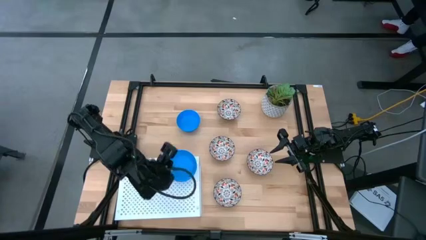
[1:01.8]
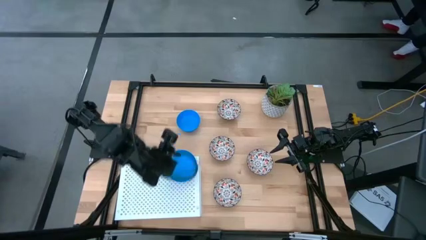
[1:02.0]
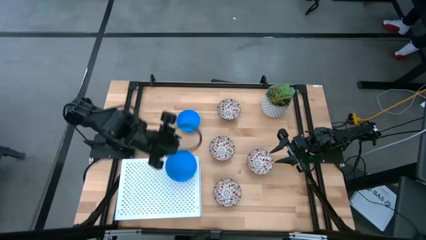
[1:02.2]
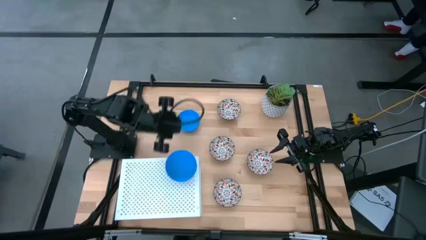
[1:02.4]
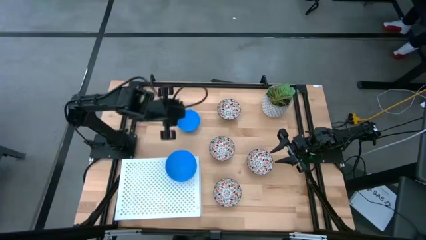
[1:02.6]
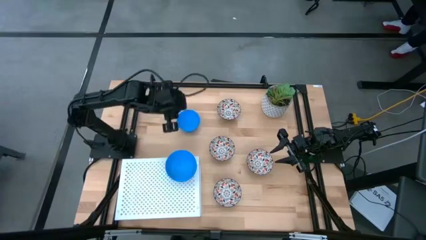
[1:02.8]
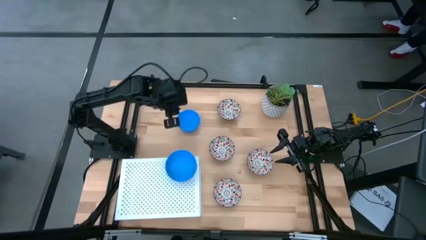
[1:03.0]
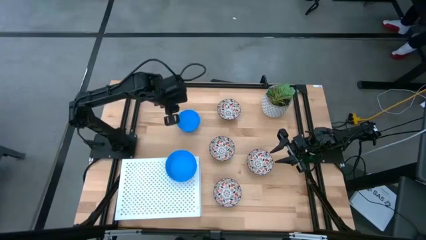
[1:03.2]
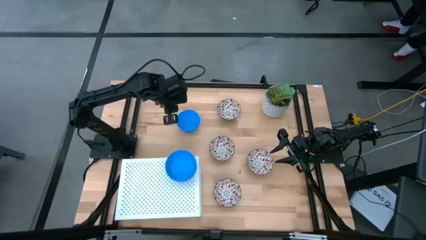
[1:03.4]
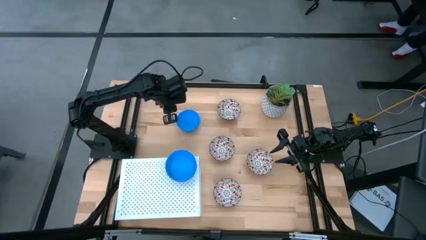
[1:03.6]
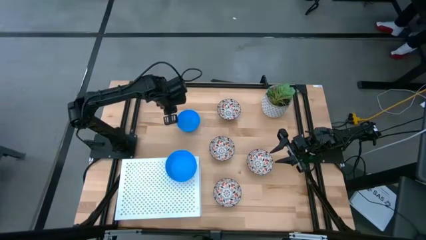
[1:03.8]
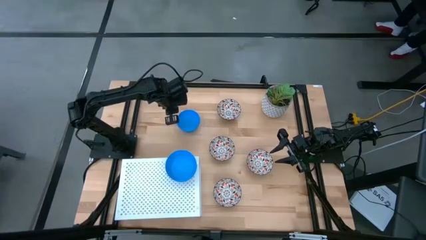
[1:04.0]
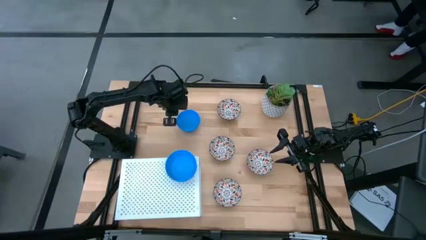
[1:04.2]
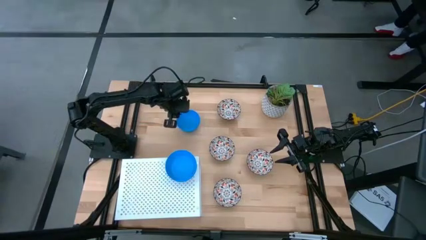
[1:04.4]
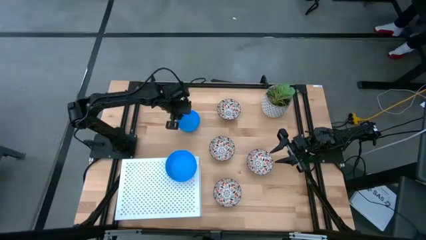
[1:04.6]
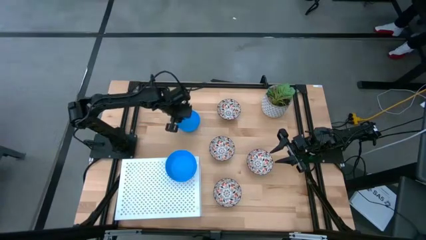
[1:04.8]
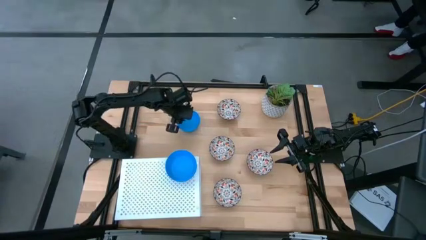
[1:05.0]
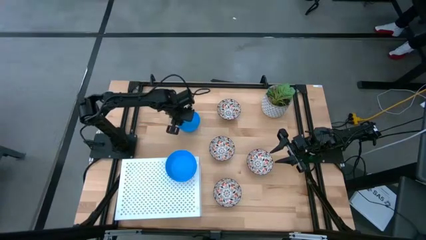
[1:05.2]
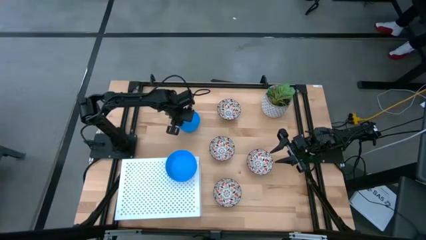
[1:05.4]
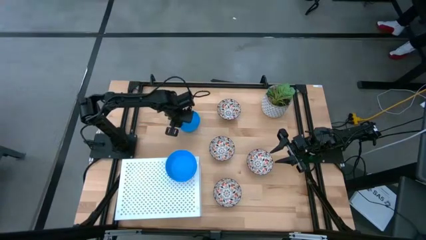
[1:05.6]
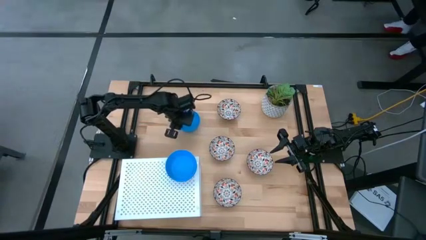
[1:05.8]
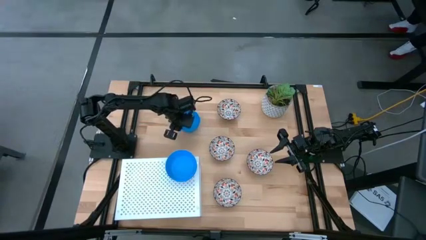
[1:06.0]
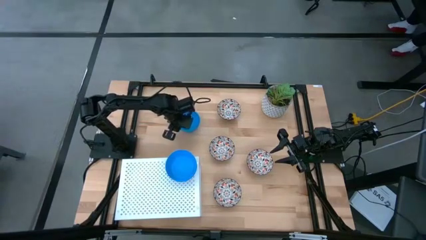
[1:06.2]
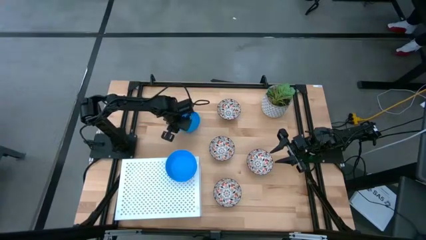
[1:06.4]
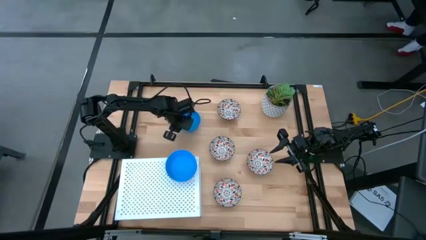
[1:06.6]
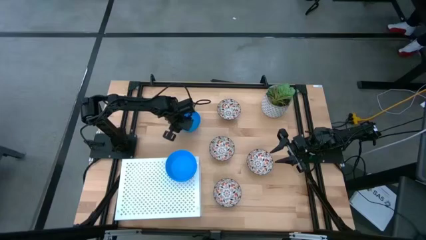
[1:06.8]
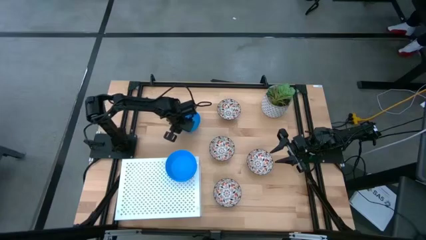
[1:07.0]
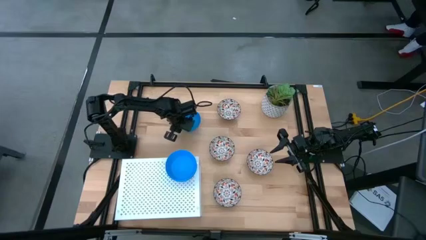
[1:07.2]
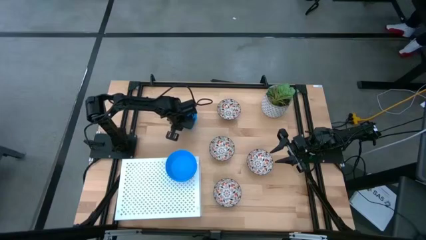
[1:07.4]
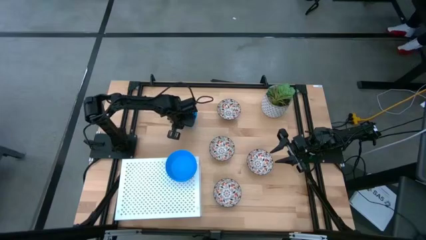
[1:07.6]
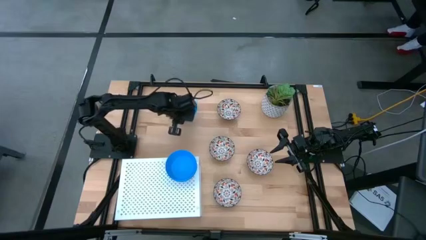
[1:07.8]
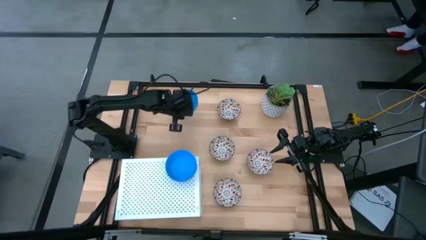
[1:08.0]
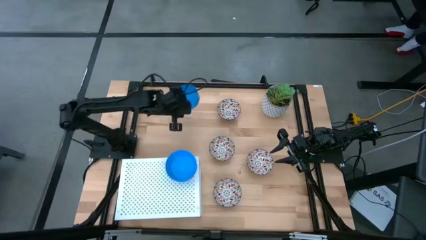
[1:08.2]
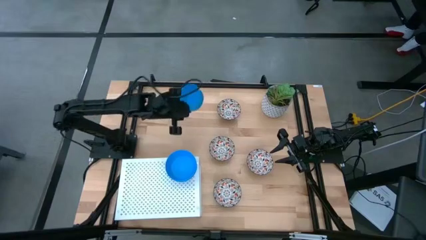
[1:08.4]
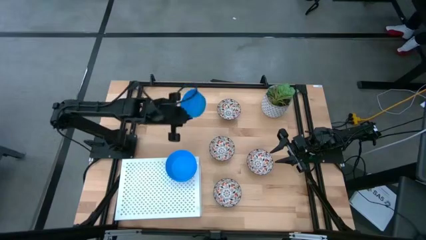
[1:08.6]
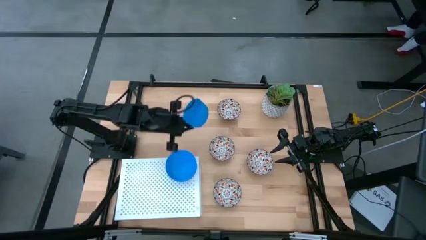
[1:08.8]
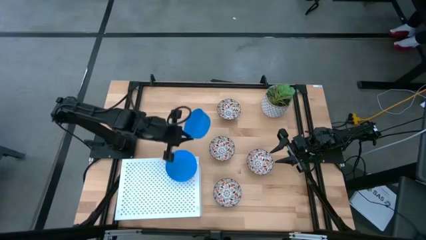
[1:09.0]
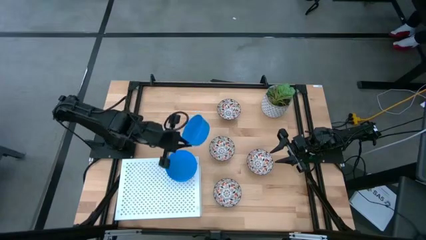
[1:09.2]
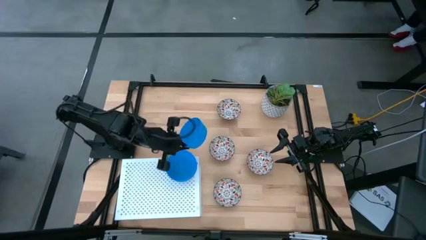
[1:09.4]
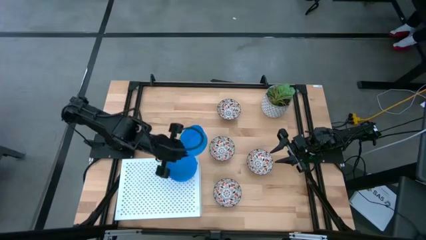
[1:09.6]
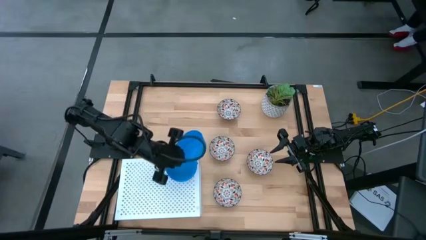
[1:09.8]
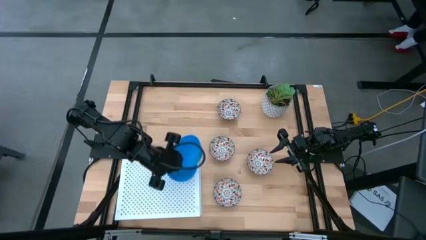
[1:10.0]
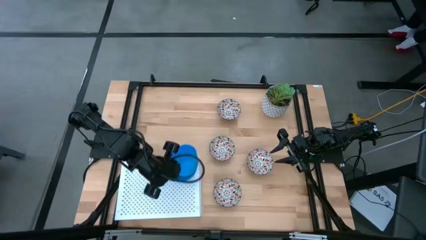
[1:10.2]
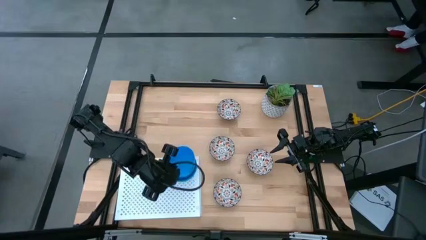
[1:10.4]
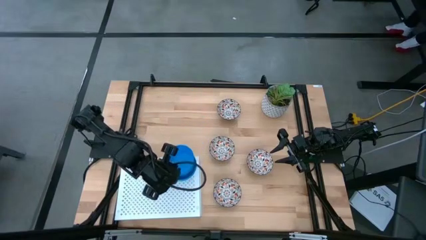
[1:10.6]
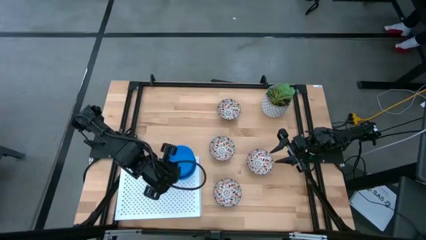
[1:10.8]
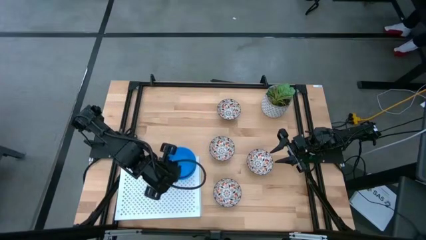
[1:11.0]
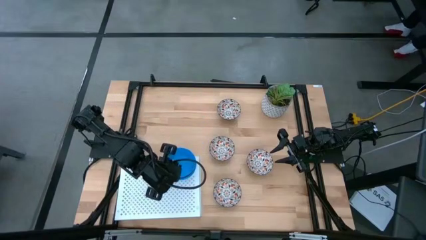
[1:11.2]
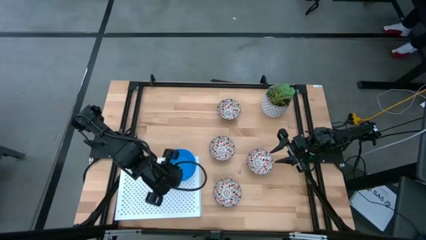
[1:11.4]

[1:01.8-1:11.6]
Task: Pick & Place Mini bowls
Stack the blue bowl on top of the stacked blue bowls on the shelf

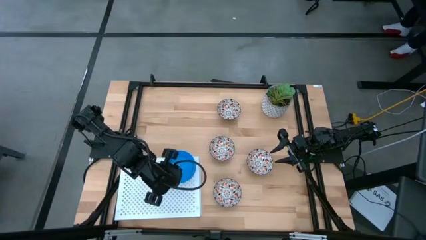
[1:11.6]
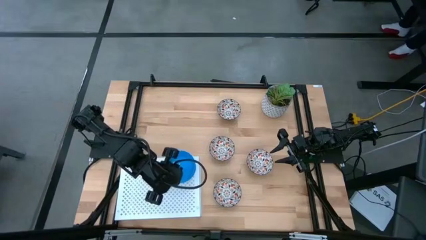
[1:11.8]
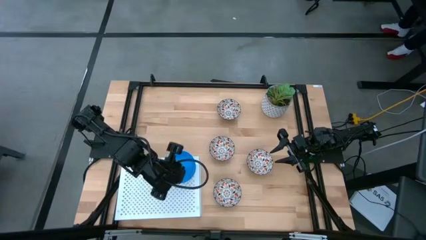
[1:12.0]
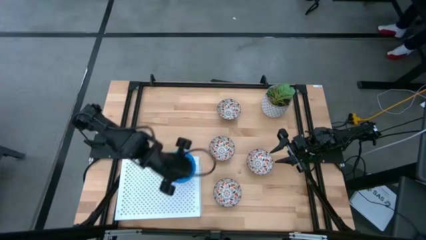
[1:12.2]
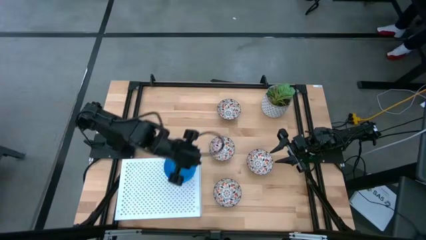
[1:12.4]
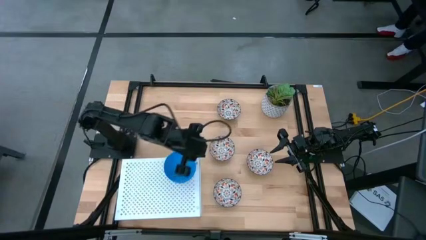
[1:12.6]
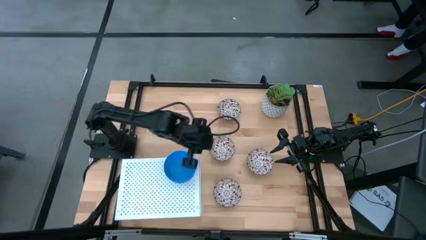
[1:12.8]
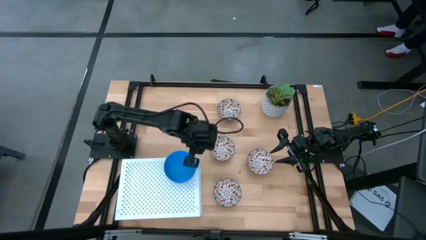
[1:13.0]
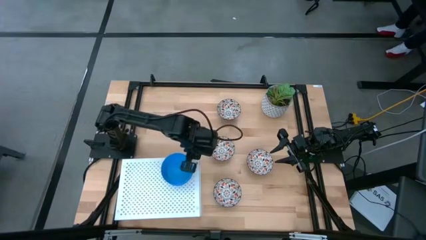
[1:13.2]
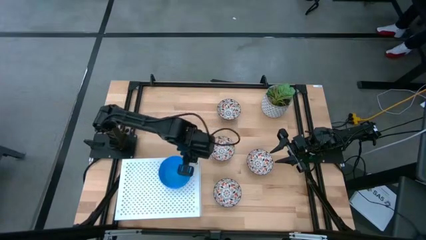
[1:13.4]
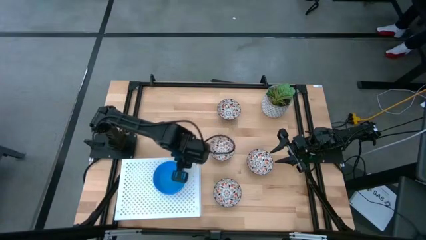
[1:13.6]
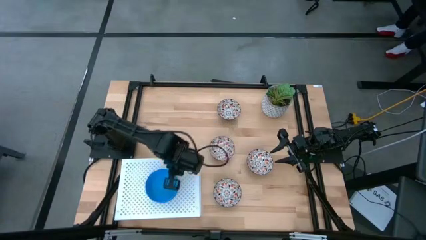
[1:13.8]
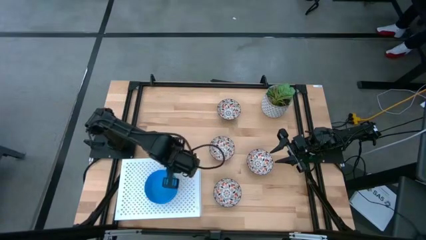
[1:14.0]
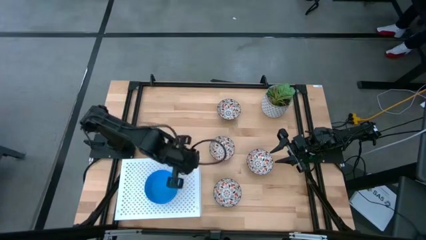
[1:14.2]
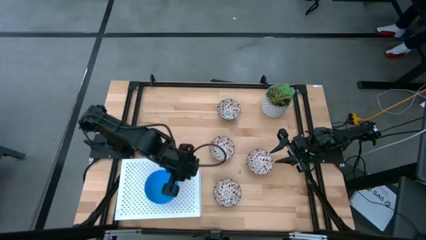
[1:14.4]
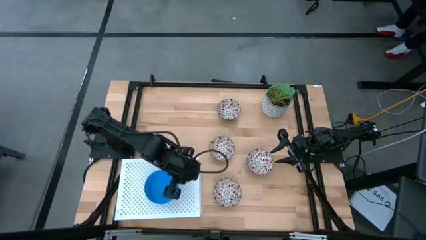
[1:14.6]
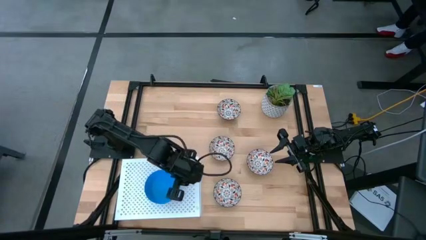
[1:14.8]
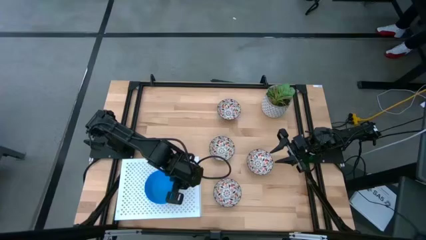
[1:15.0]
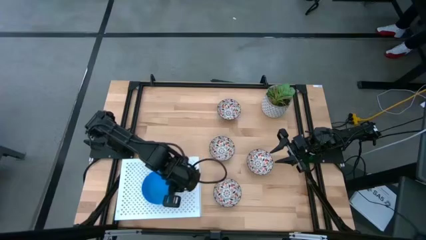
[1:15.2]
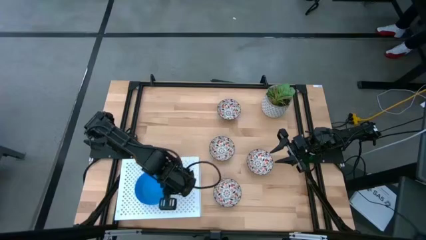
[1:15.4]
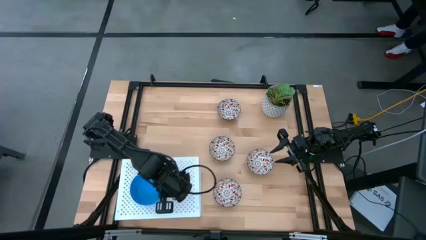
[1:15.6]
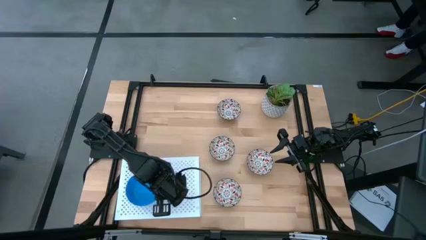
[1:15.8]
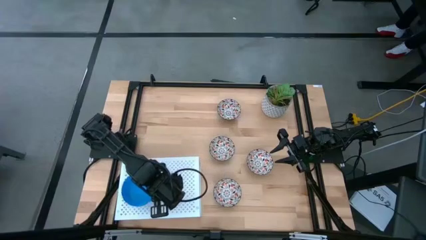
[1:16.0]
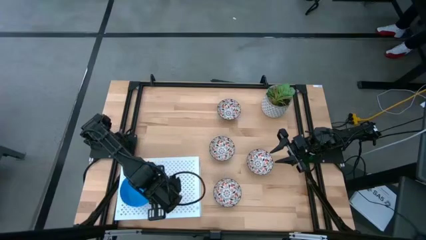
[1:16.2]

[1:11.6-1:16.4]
Adjust the stacked bowls on the shelf
